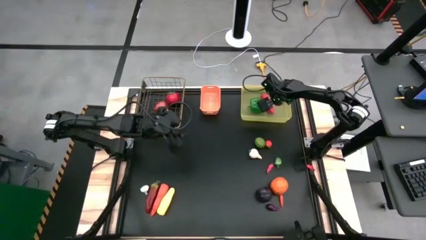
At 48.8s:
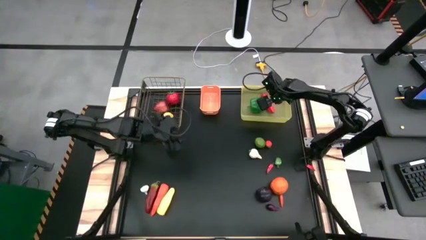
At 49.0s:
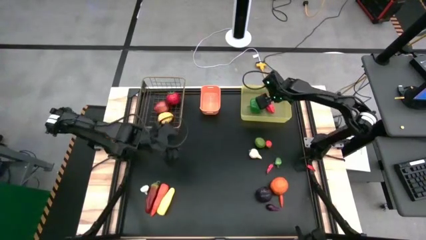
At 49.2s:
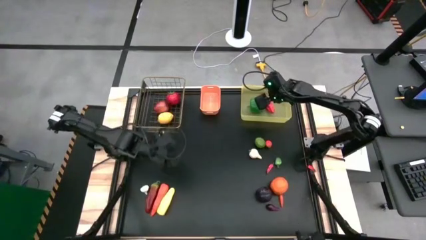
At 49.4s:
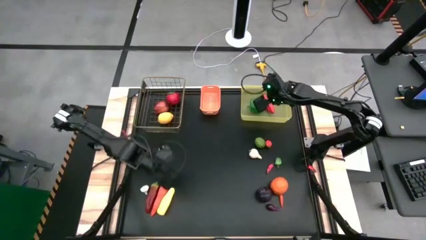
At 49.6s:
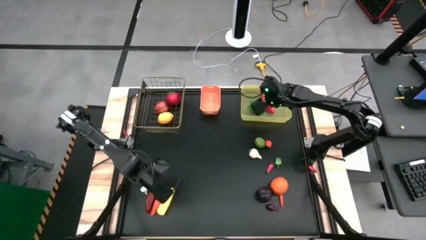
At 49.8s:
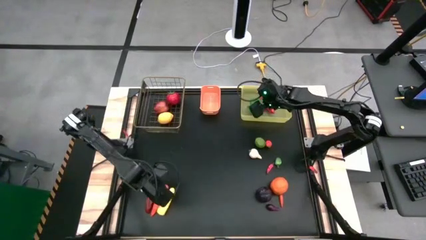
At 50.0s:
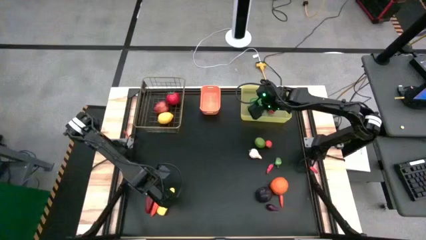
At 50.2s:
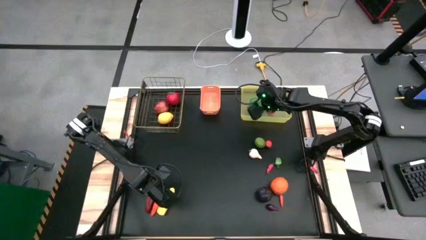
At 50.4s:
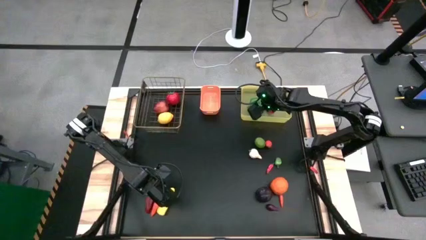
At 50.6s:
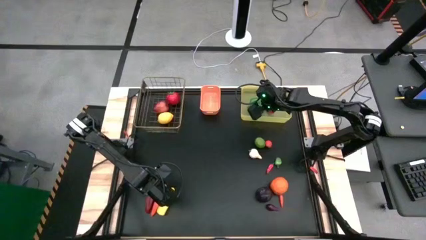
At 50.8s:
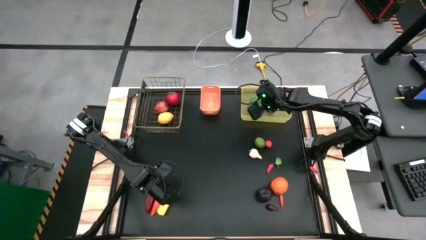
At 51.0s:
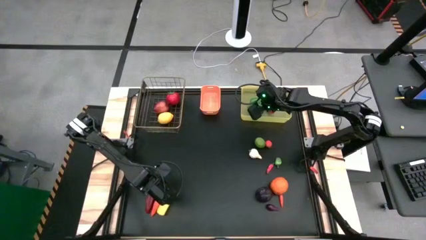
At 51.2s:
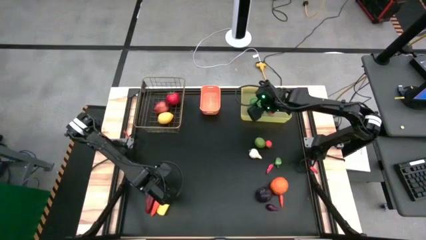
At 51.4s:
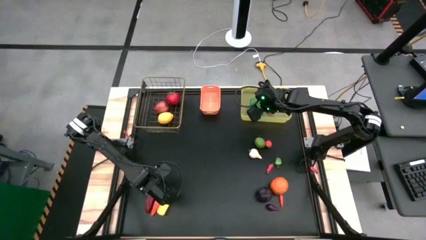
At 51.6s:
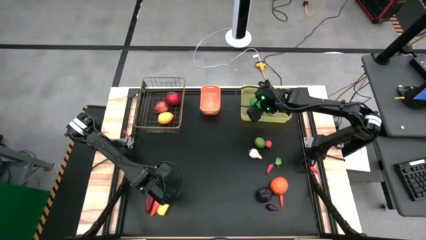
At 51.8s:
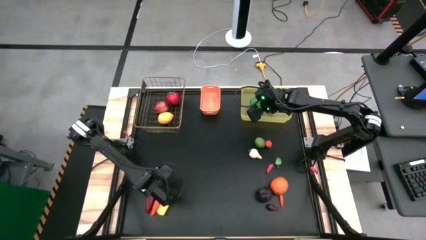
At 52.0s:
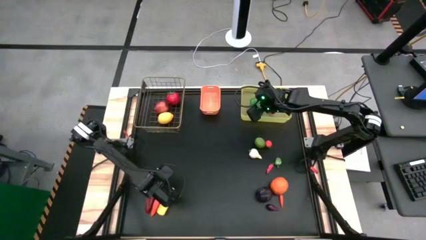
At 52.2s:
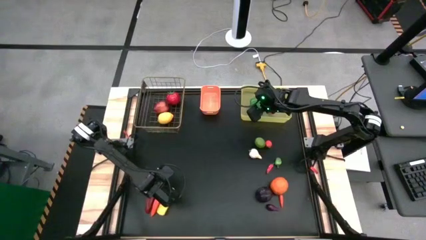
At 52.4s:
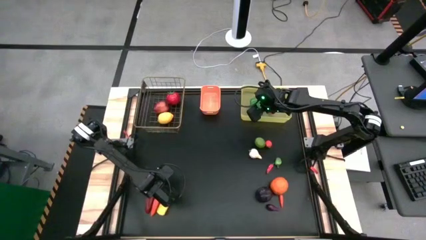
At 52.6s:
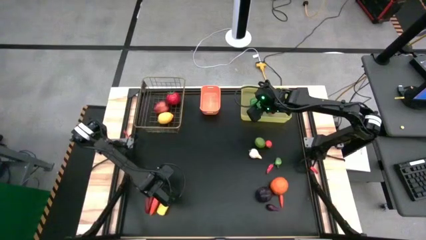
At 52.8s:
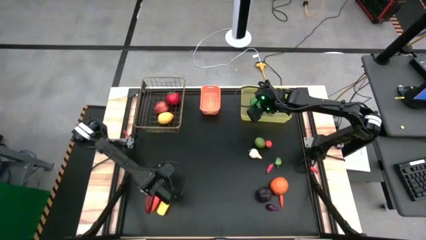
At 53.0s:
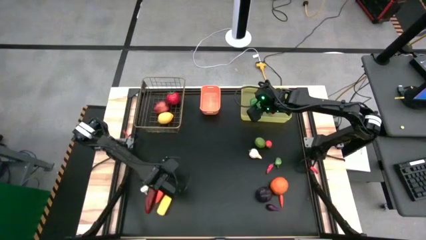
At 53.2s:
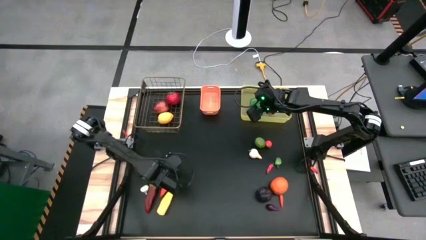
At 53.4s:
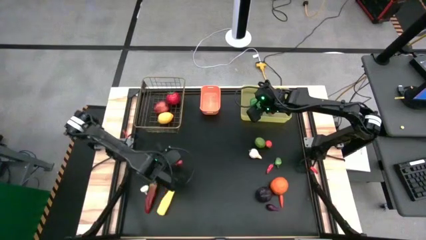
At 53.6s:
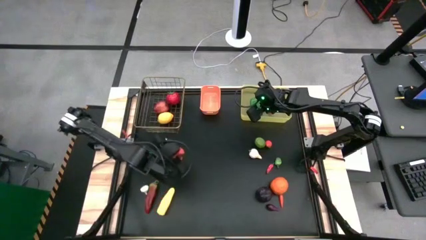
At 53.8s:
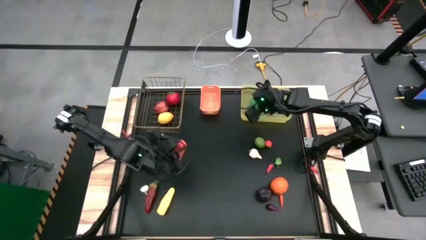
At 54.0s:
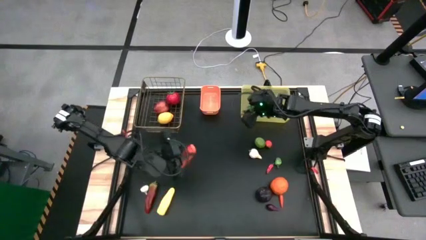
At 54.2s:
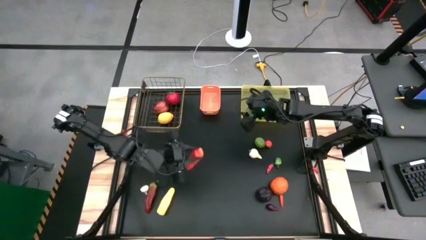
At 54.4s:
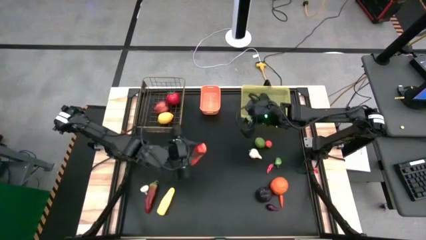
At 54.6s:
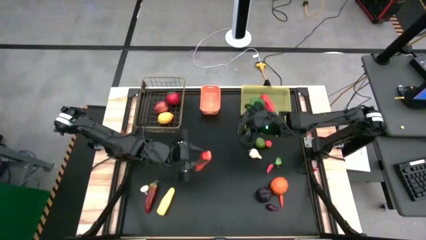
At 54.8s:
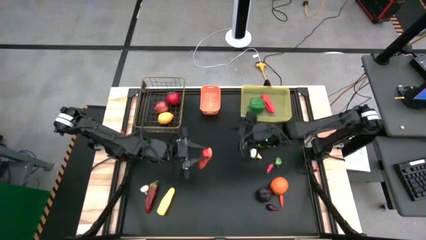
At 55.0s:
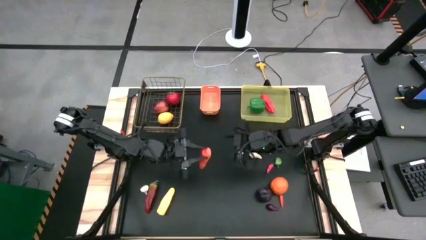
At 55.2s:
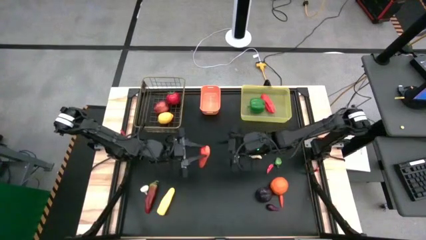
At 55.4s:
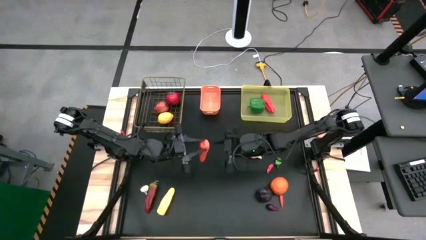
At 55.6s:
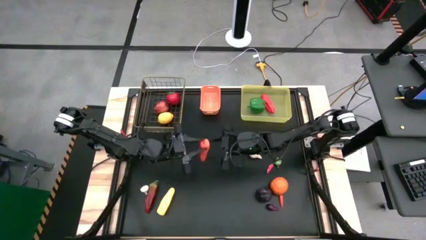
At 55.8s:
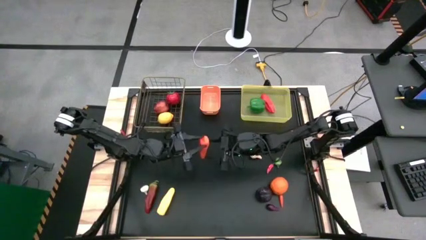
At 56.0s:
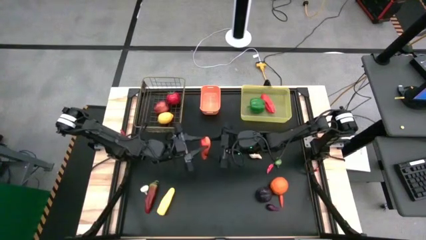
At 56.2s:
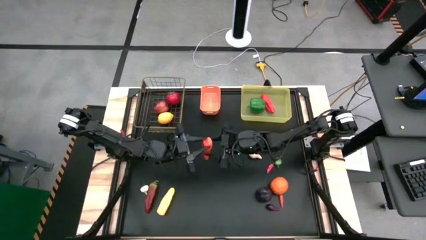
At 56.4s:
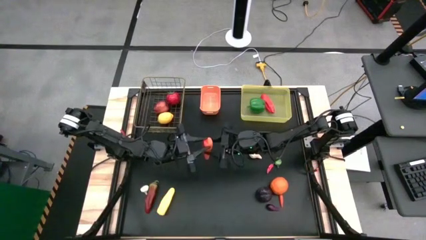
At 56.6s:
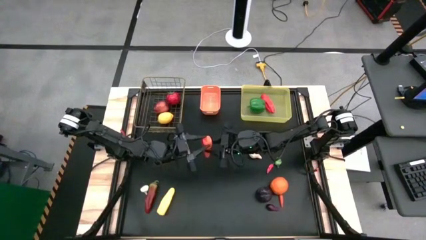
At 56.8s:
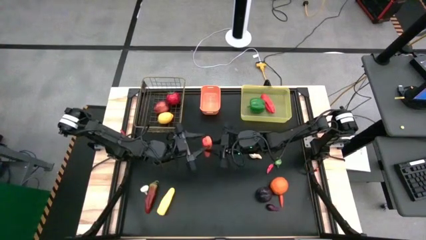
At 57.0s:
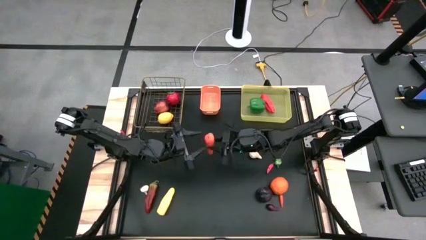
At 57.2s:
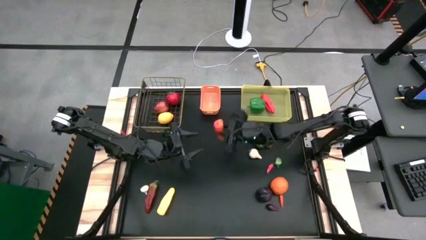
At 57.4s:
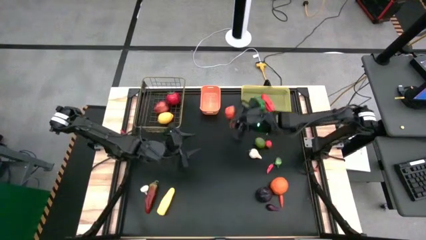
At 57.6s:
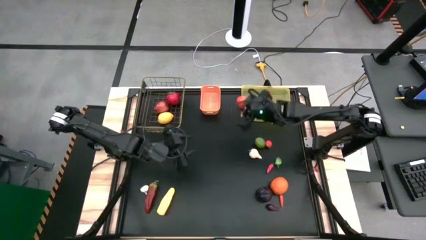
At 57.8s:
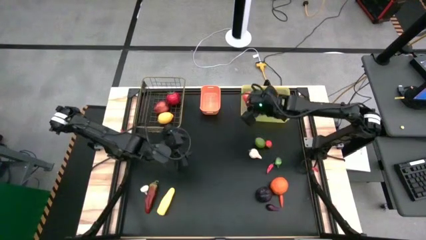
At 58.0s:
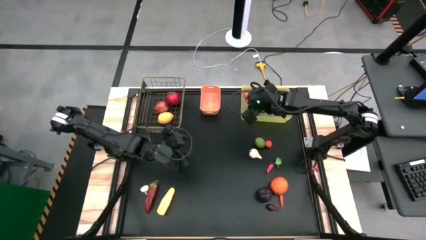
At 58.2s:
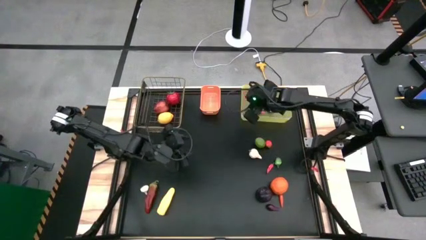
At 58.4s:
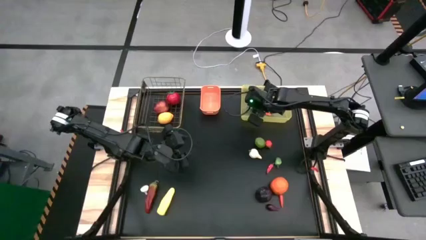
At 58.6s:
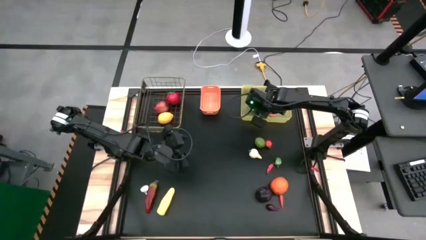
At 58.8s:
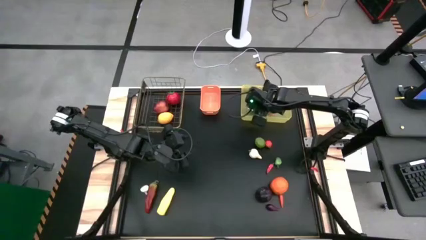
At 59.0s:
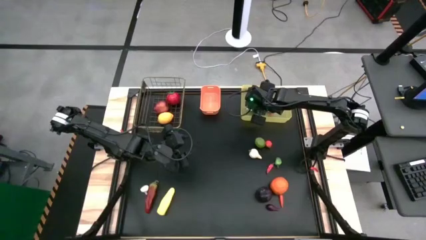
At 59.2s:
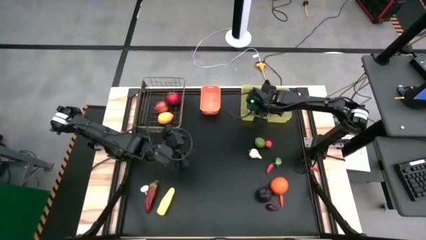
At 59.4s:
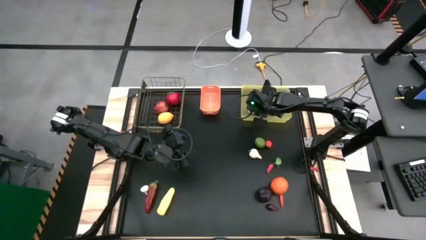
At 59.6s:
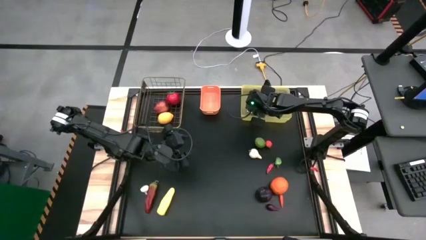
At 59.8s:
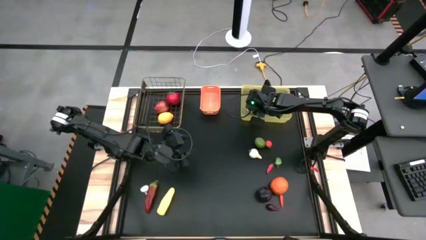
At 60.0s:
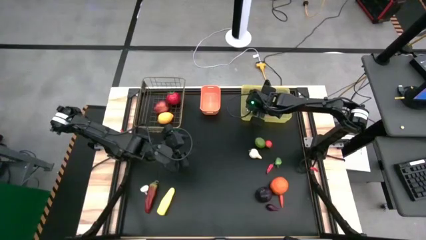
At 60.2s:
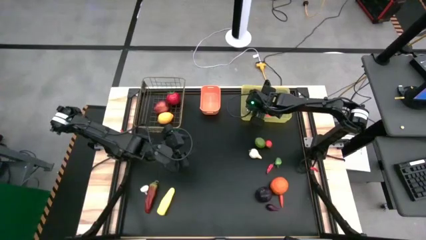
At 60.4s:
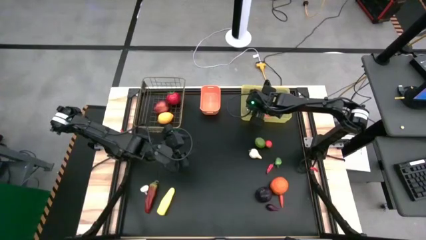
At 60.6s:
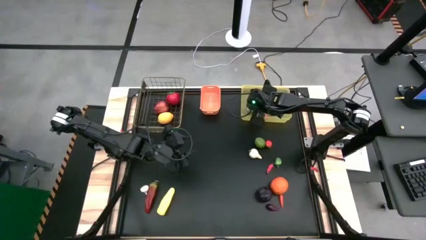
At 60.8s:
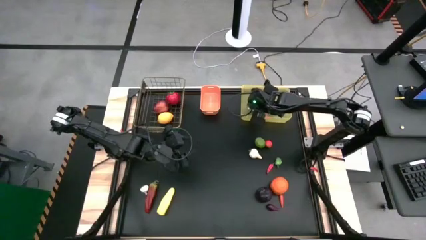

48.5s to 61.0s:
Task: Sort produce into baskets
Put the orange carrot into the yellow bin

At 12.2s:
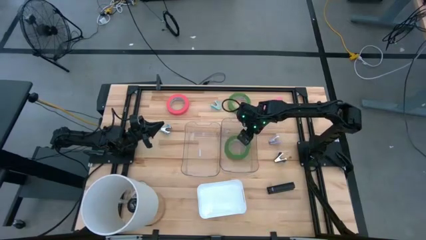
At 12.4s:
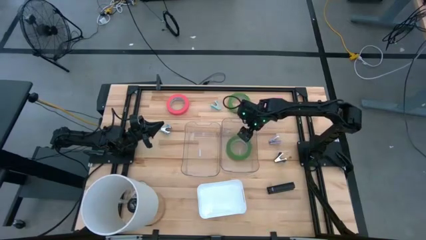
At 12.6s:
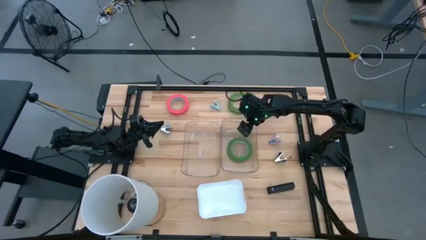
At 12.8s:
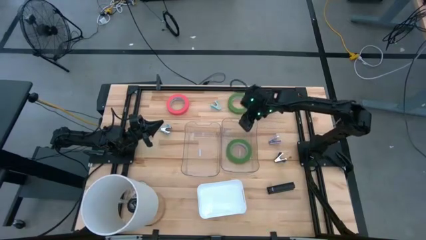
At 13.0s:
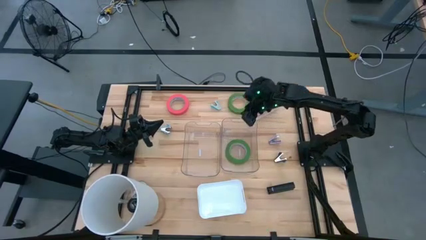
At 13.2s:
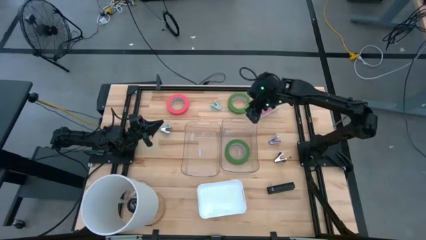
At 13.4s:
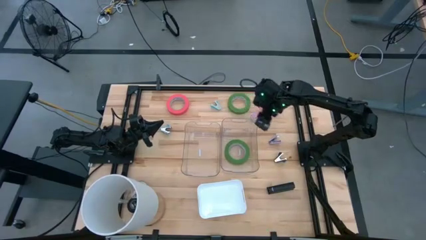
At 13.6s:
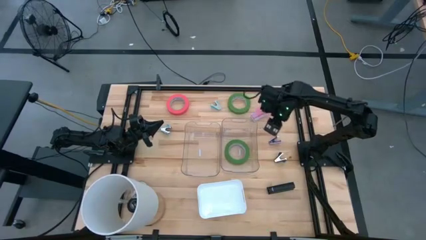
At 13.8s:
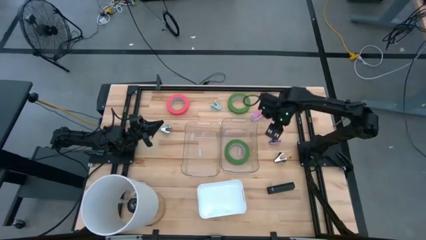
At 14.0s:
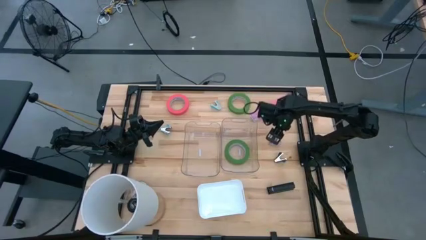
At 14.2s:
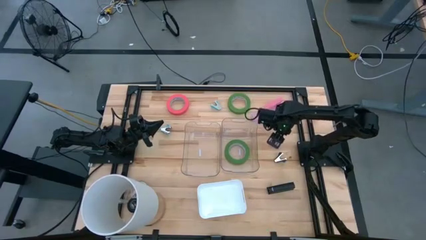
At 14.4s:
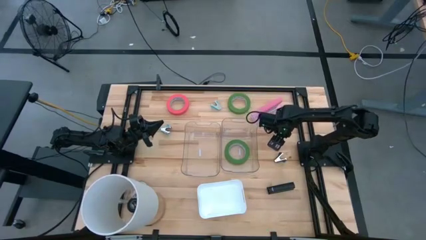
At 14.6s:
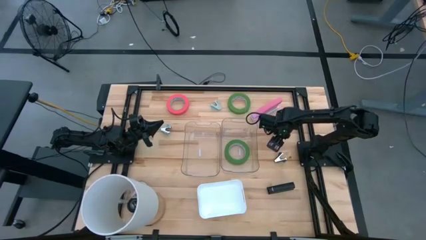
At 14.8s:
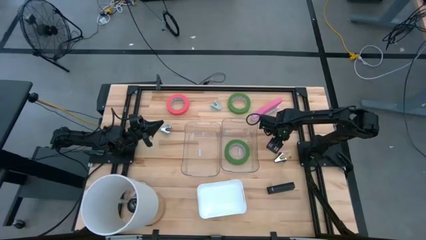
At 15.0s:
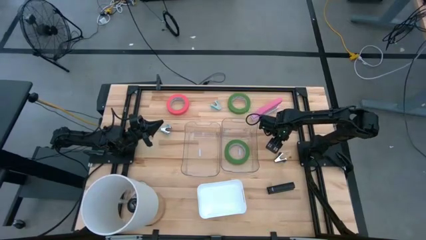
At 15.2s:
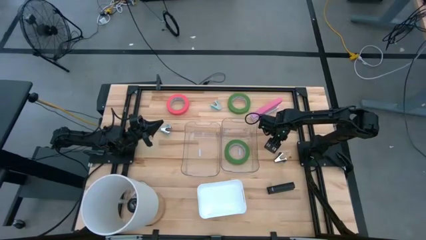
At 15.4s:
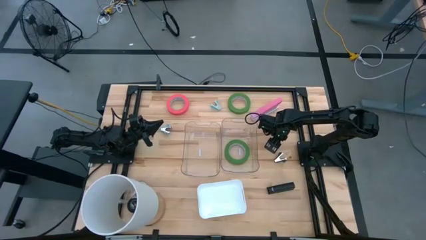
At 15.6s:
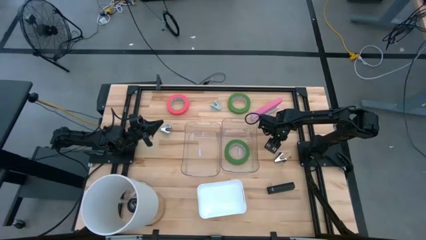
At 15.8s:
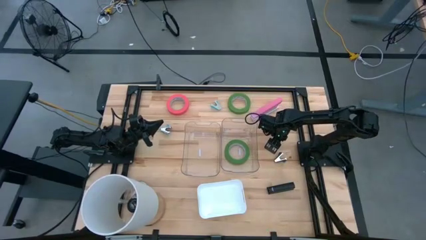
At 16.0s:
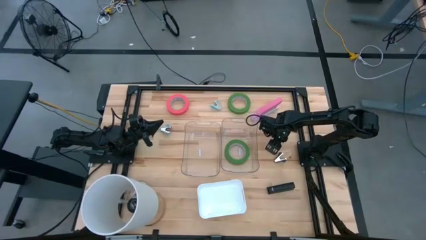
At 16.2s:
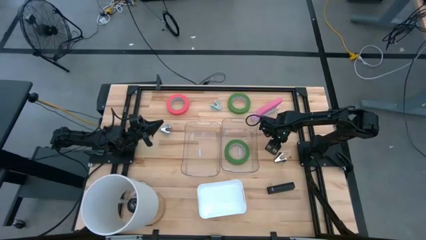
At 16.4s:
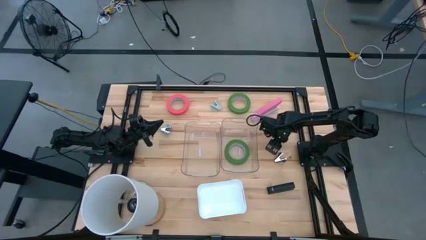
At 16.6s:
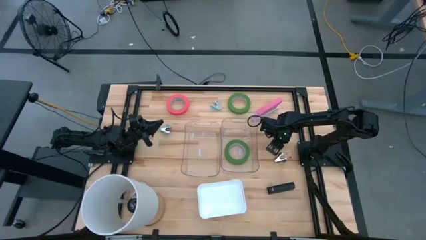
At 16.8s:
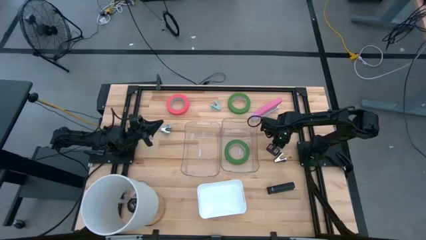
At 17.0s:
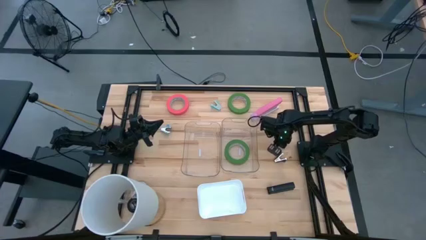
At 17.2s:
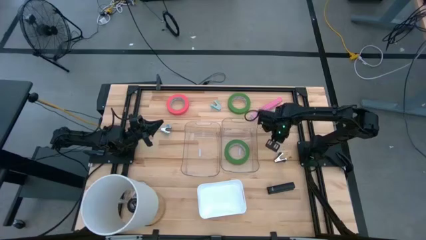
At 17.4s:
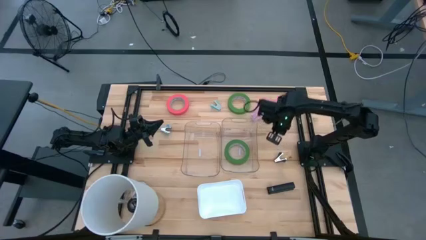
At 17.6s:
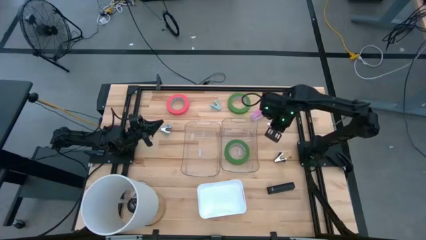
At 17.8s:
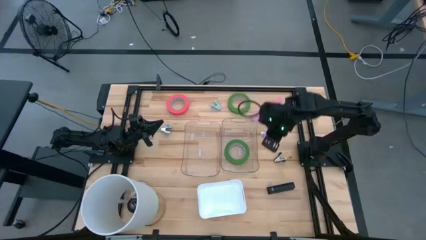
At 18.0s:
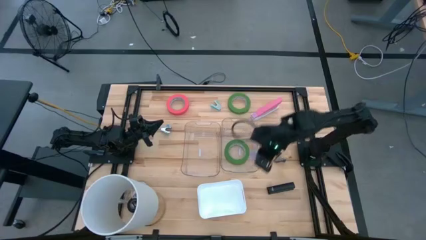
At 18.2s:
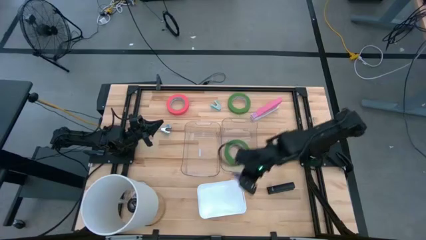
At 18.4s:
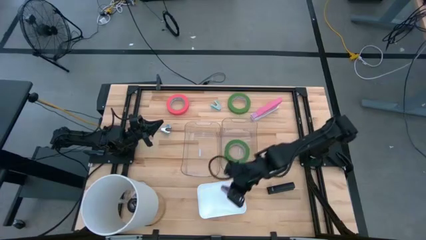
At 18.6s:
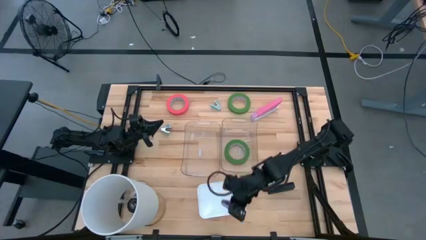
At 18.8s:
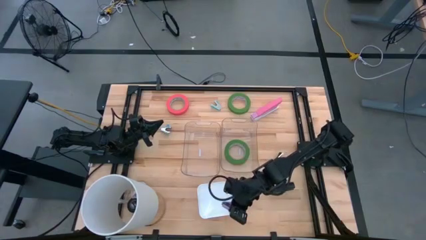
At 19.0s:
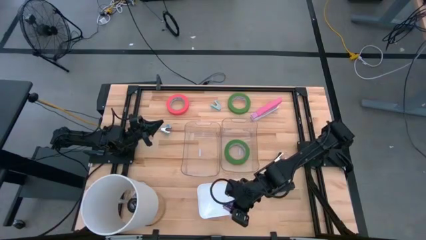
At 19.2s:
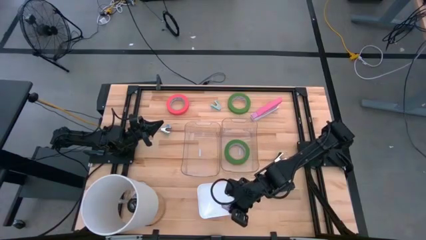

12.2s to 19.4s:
Task: Pick and place Stapler, Stapler remover, tape
Put the purple staple remover into the white bin
